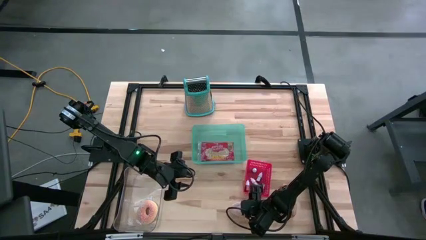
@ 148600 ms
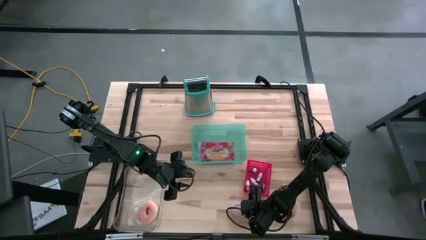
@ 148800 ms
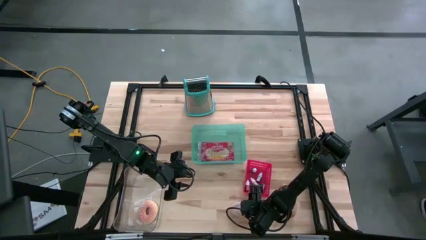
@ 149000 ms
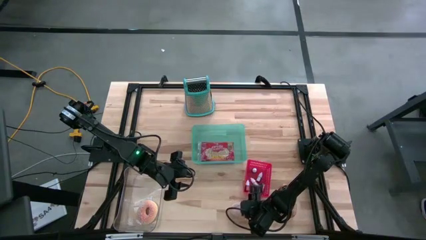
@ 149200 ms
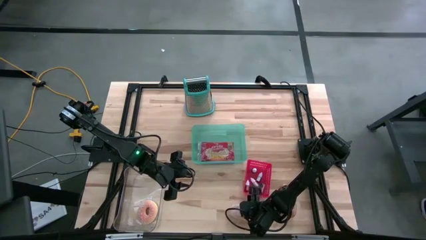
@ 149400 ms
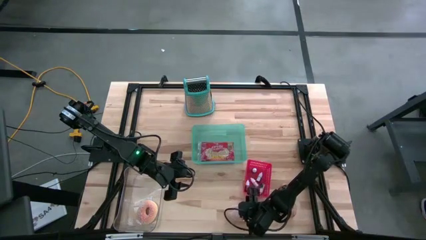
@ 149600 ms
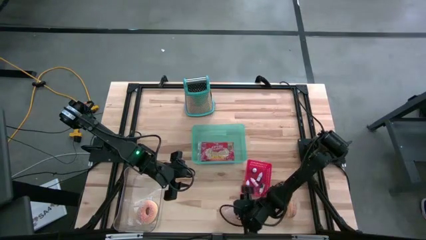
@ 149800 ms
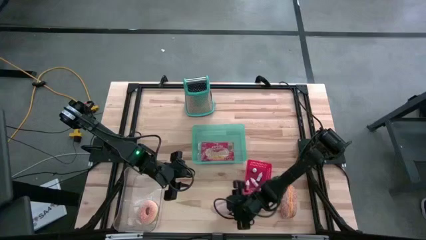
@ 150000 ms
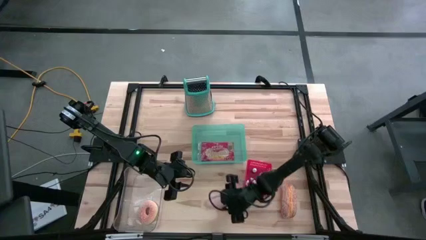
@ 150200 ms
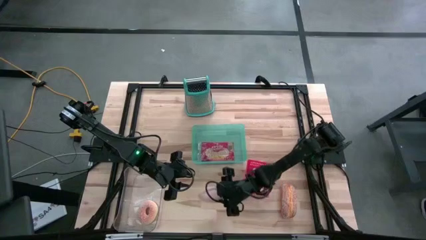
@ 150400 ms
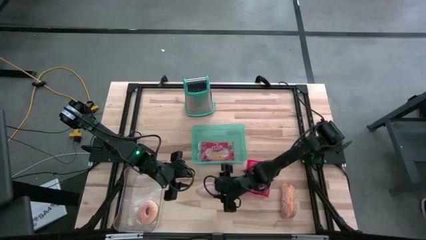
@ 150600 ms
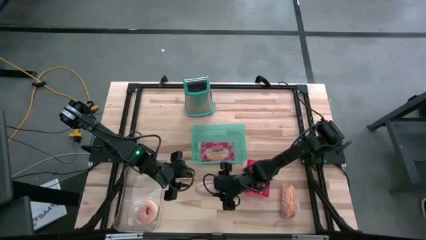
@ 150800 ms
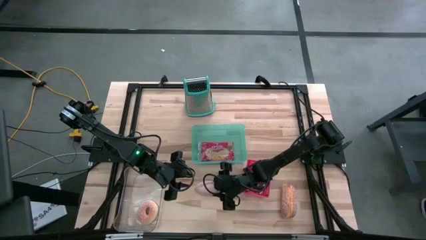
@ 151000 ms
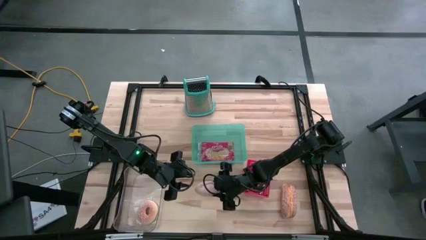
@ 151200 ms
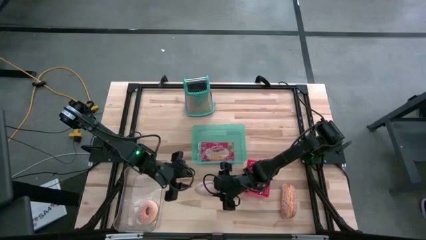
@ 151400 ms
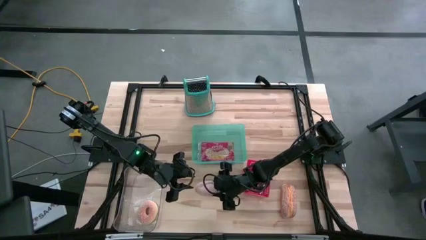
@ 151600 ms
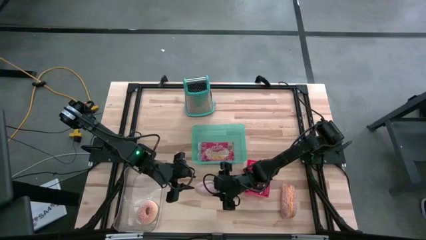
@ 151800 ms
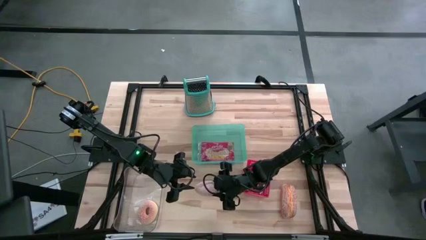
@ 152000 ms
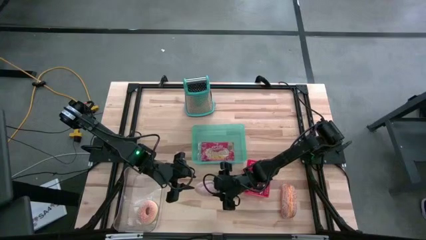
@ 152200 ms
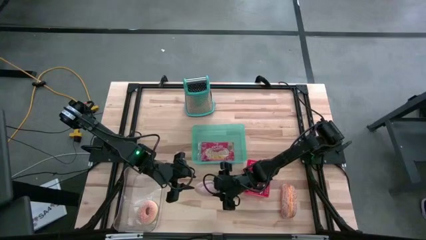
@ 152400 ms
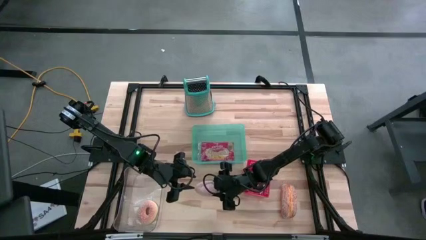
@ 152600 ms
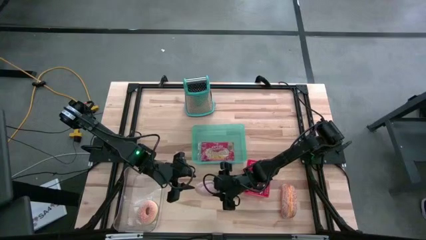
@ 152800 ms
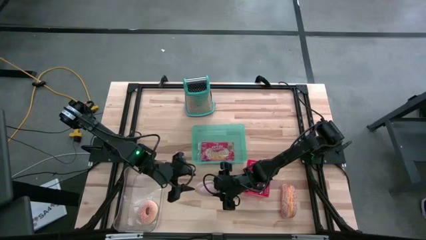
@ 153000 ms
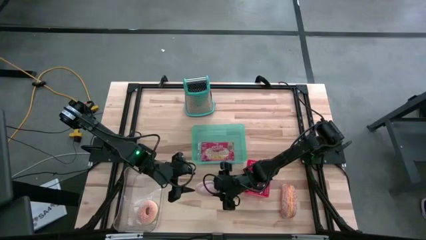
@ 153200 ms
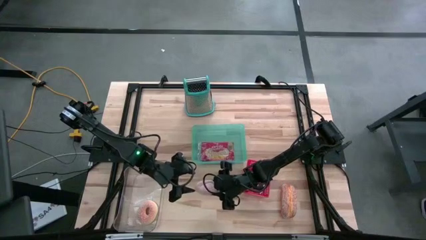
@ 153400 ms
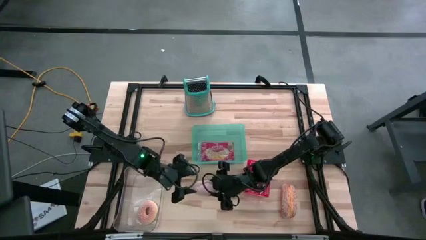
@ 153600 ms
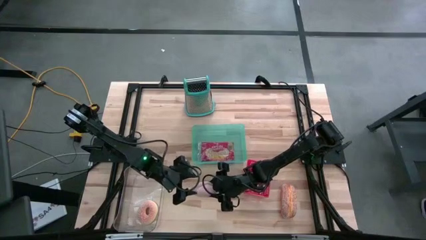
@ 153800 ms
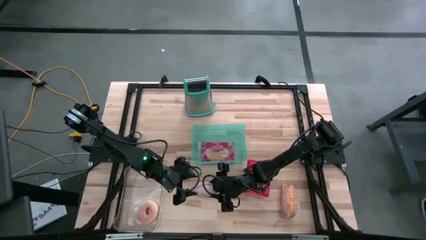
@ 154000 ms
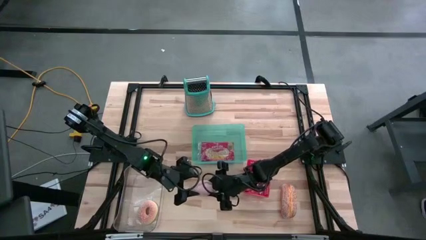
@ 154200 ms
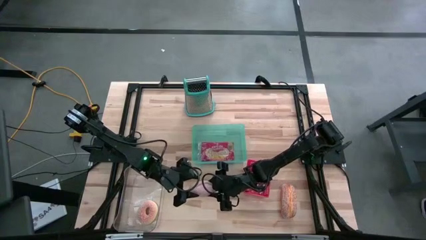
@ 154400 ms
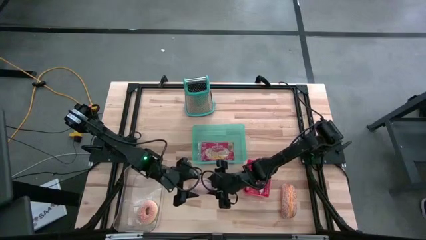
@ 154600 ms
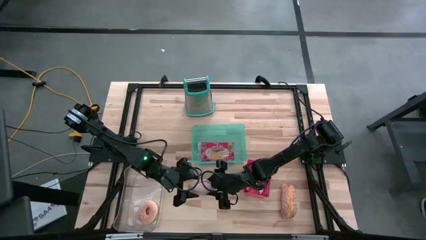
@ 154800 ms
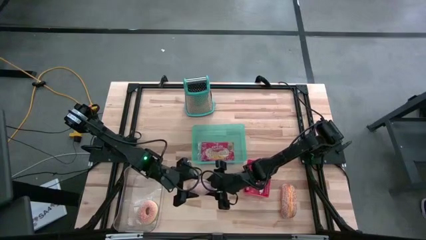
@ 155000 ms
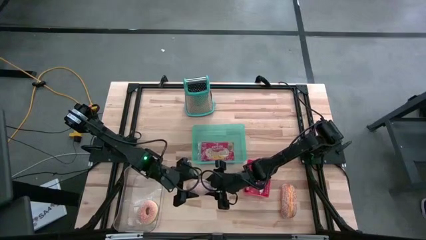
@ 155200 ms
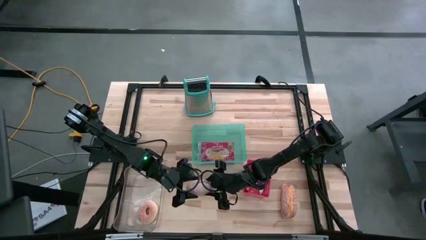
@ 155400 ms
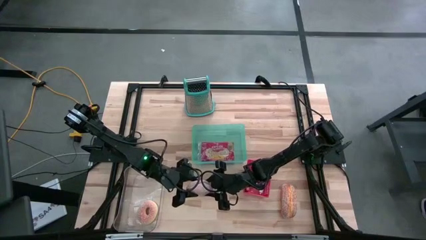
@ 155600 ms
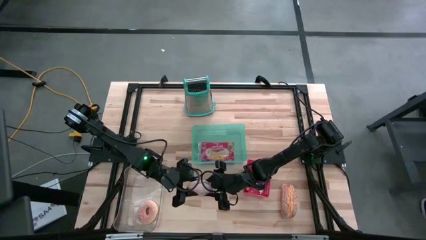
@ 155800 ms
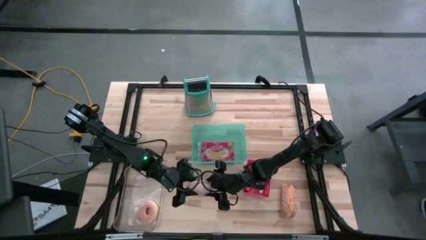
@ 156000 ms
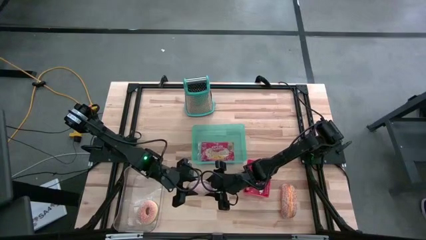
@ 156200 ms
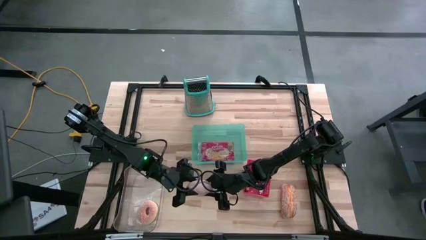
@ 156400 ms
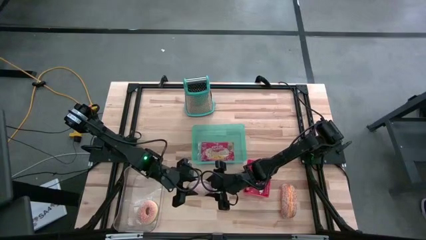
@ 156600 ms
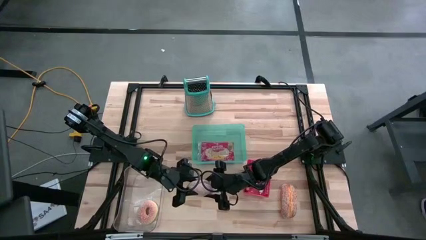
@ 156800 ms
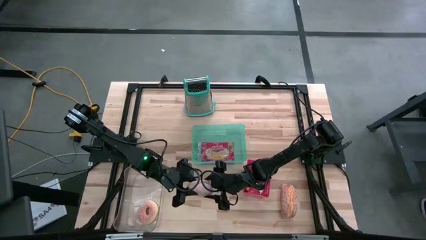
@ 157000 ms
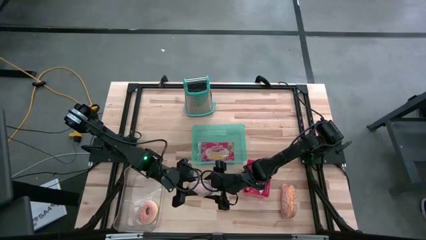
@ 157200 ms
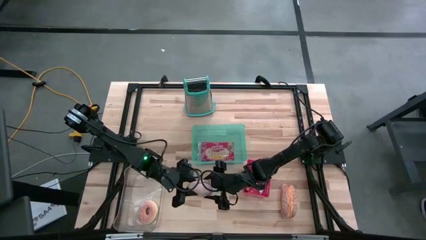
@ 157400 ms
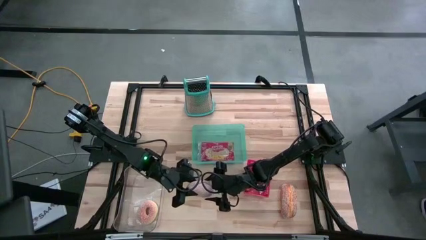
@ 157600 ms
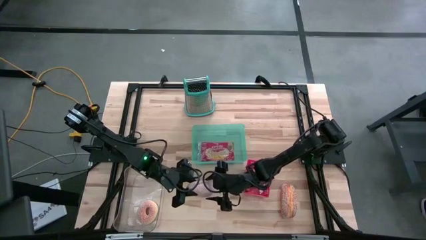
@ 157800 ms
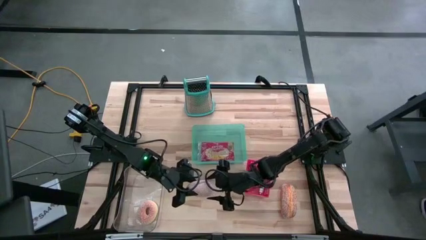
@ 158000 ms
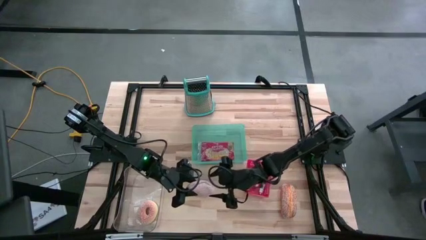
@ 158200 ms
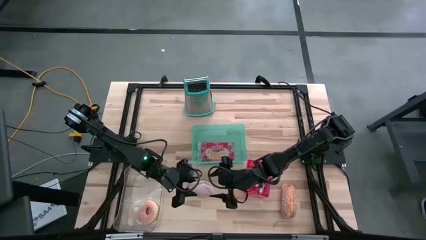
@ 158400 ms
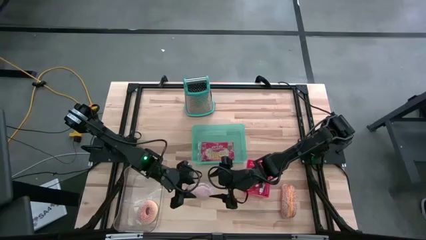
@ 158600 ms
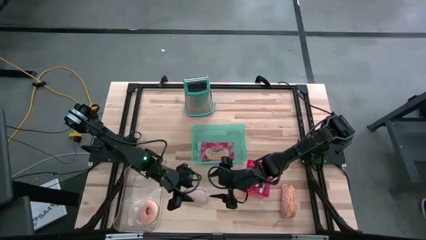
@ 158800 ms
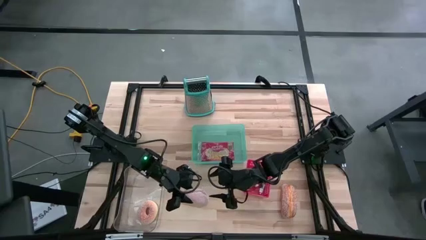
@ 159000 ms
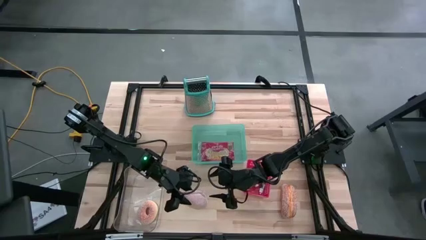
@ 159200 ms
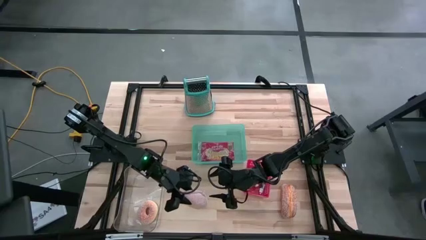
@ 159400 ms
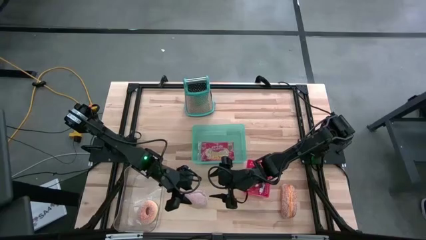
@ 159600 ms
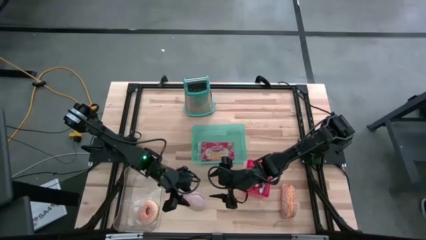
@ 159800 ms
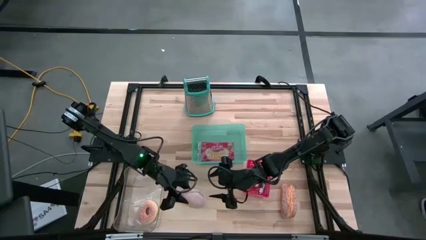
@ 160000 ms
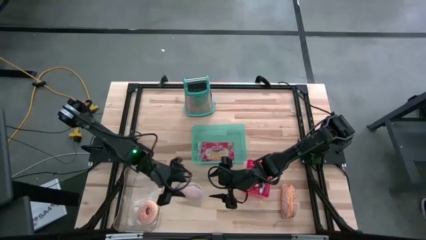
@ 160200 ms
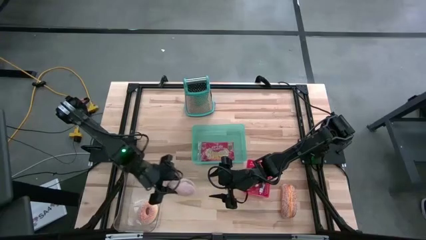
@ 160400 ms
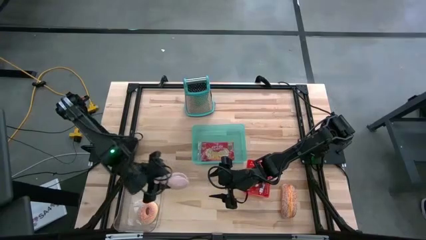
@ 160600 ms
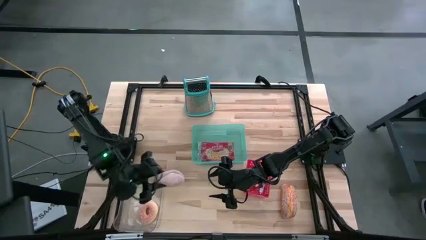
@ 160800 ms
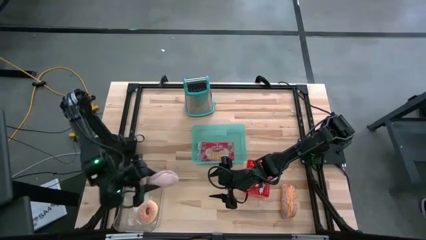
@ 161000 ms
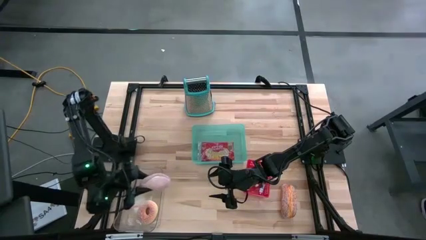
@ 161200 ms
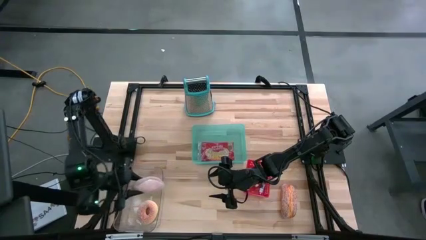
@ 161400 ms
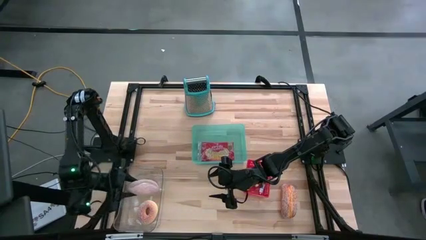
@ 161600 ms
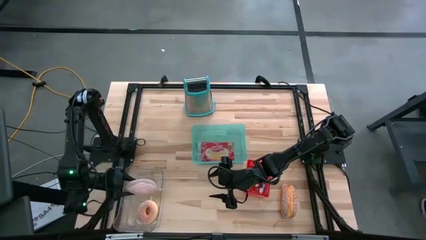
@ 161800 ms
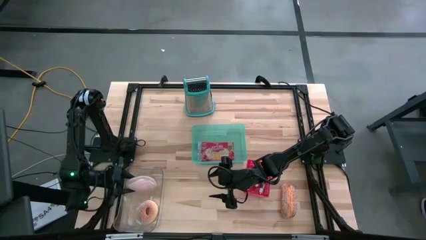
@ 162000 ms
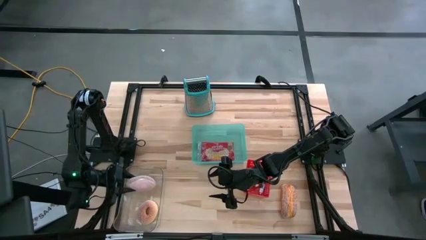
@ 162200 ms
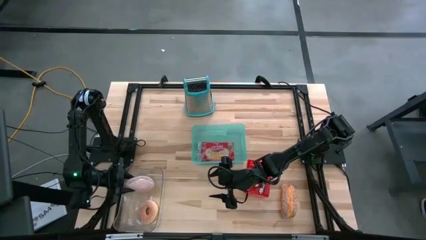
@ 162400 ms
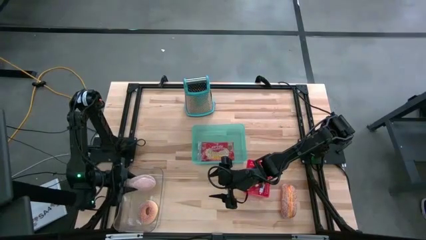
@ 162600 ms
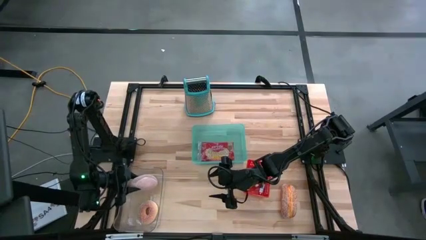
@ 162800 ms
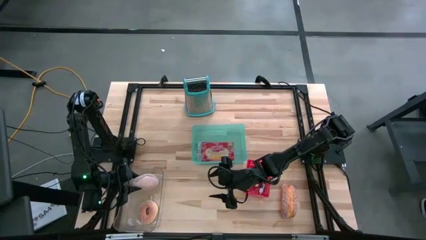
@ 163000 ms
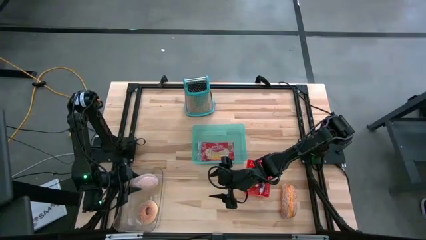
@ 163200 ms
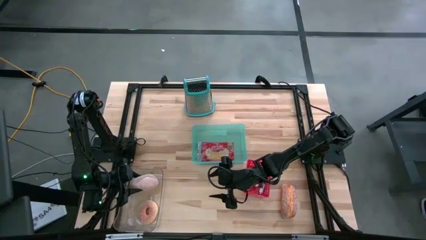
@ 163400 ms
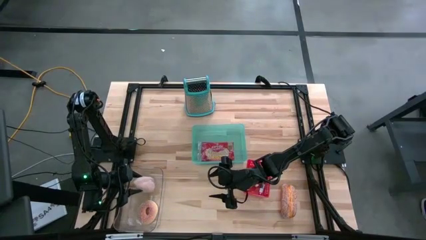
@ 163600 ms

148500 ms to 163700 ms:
Task: Pick & Place Food Item
Put the left bread into the transparent bin
